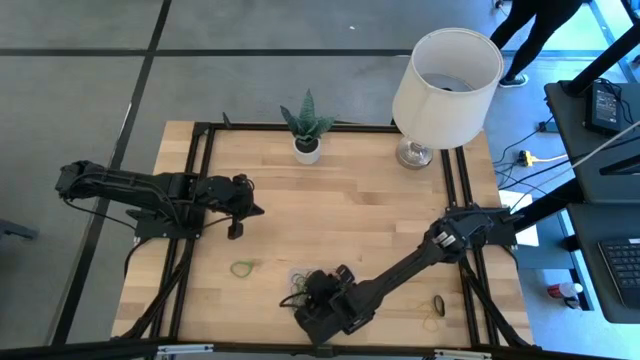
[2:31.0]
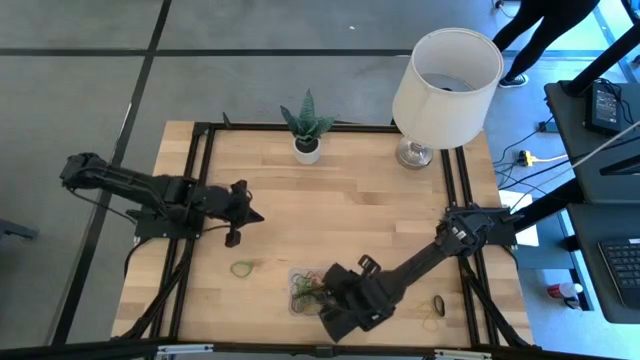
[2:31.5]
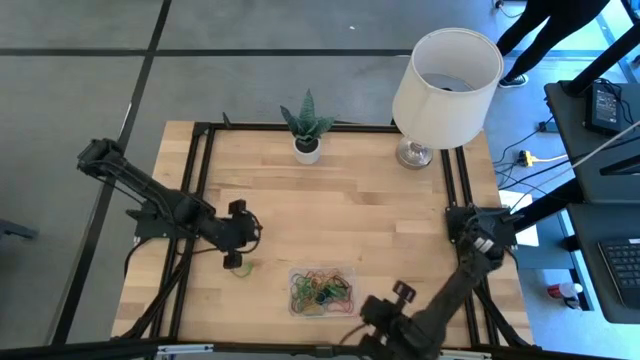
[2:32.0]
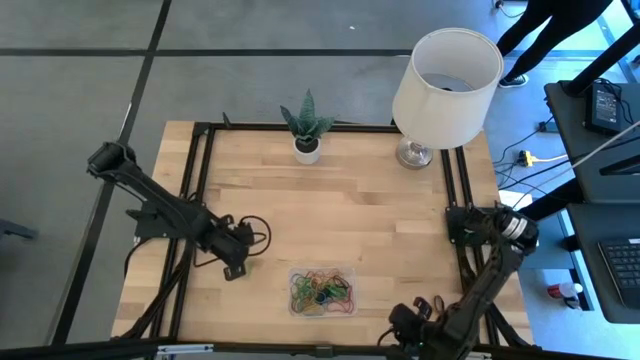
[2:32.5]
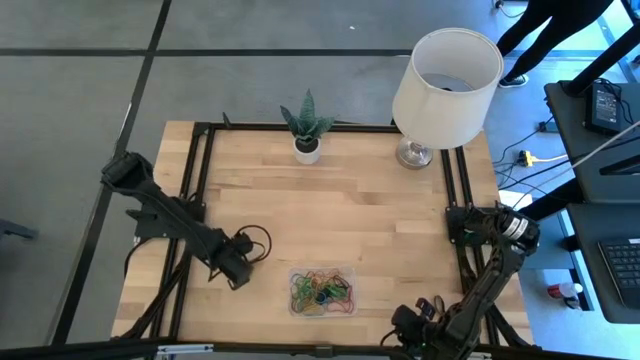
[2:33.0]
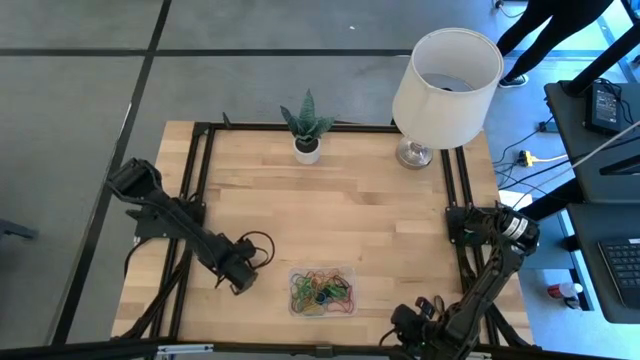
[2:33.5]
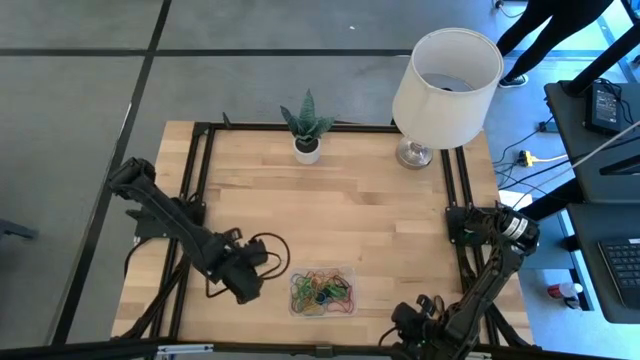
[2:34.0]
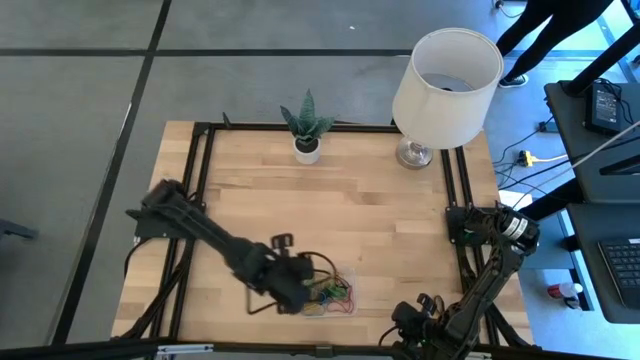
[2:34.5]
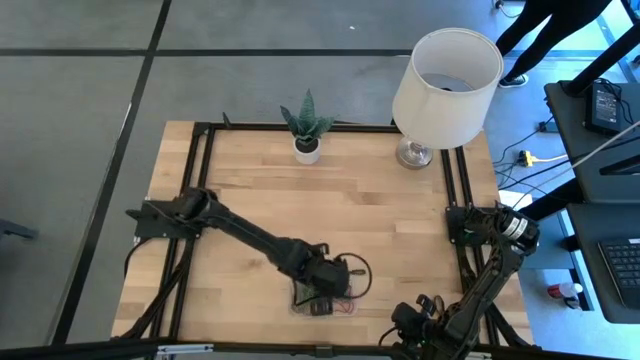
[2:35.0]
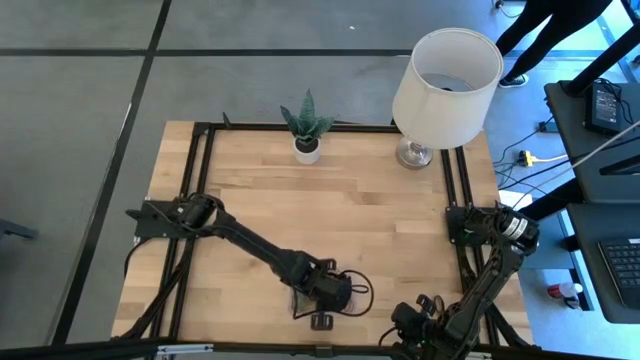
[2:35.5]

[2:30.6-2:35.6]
Task: Pick and place rubber bands into bin
Put the green rubber band into the transparent bin

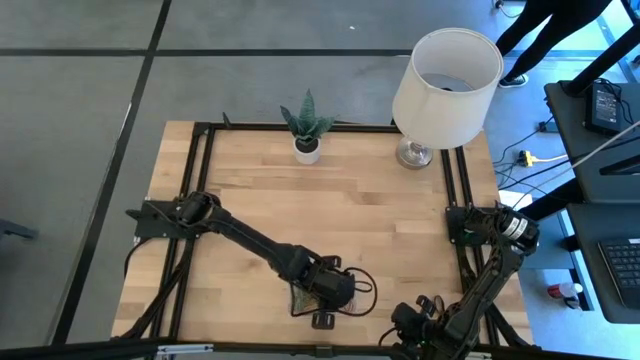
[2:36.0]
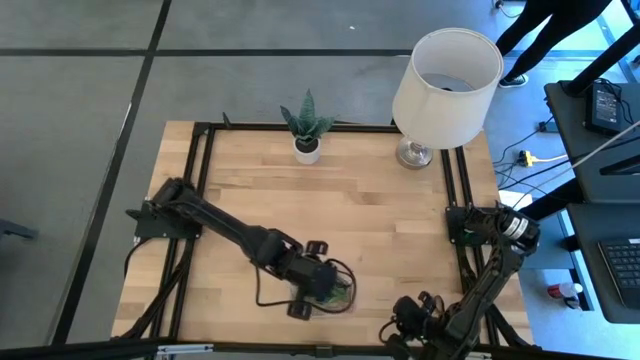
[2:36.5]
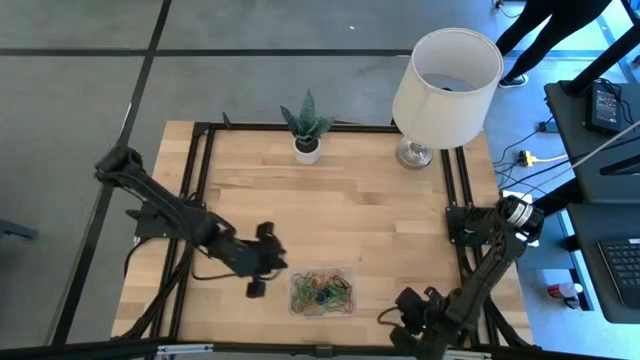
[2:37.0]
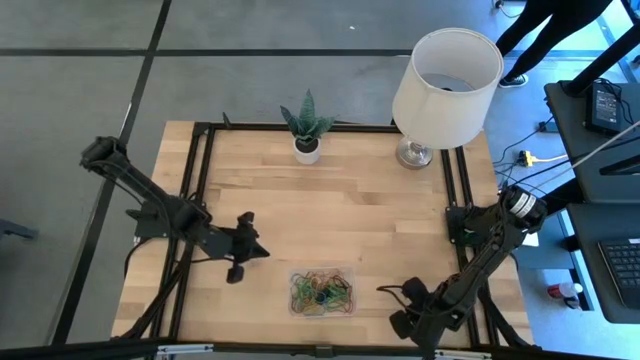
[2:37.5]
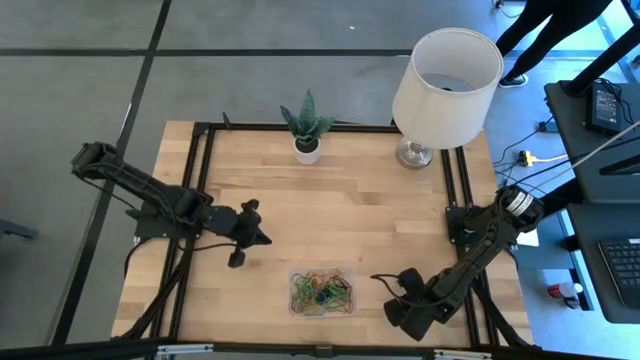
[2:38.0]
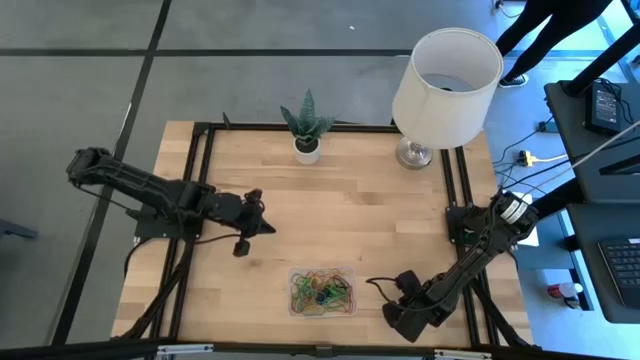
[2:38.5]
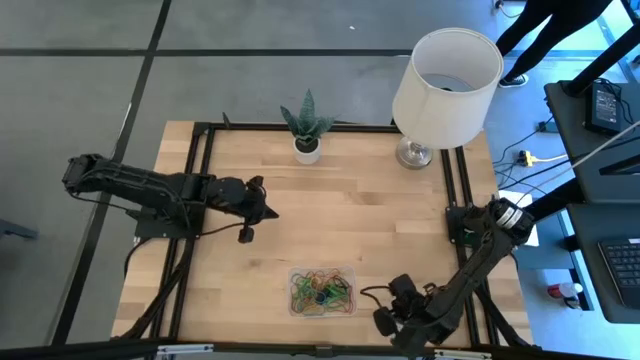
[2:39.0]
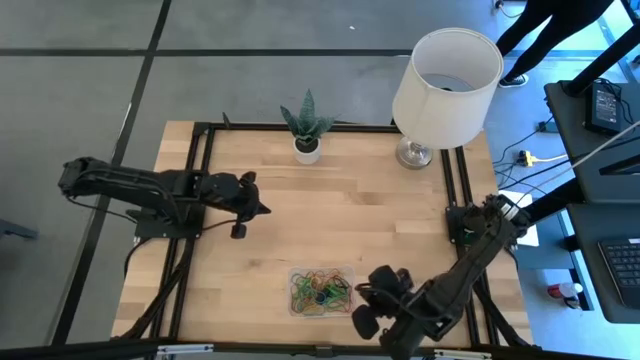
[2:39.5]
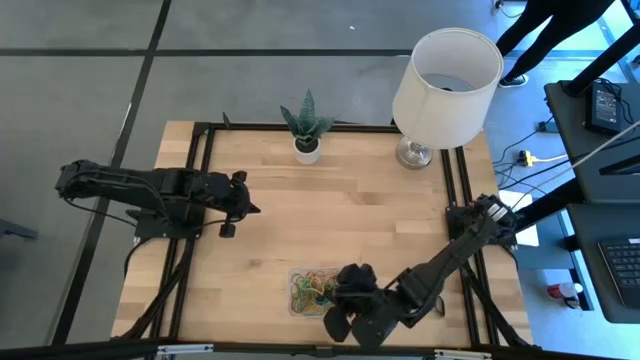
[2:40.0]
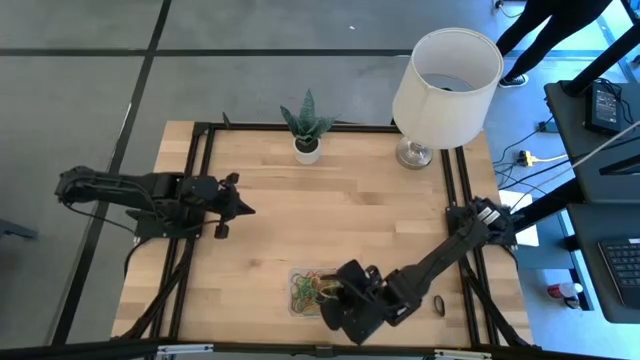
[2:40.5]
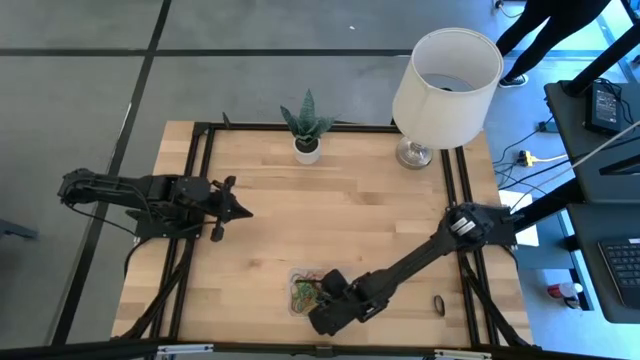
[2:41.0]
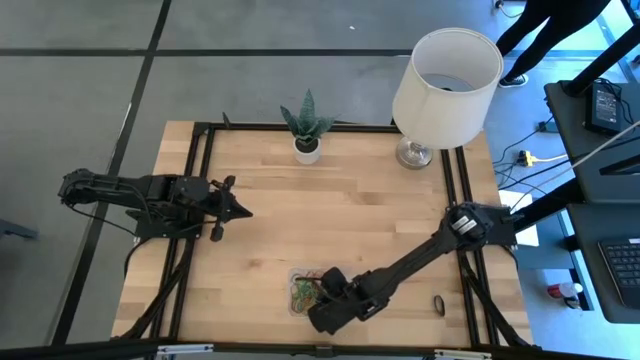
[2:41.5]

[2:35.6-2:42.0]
Put the yellow rubber band into the transparent bin

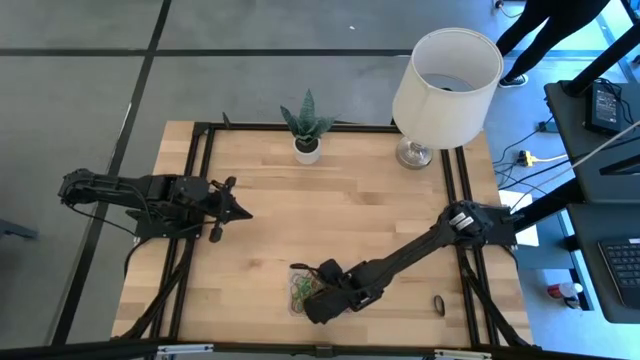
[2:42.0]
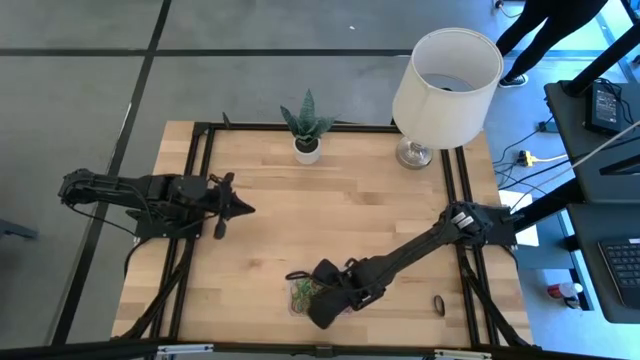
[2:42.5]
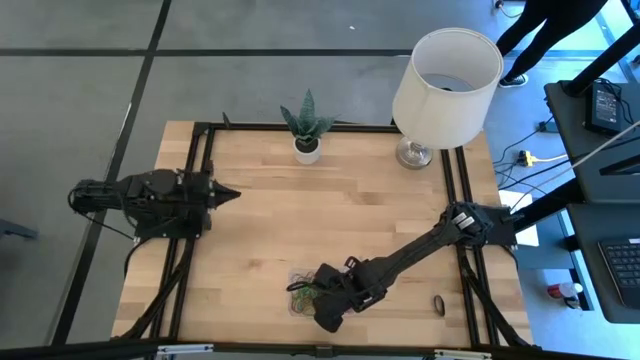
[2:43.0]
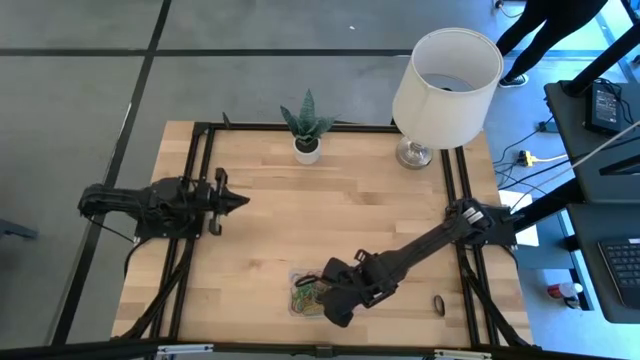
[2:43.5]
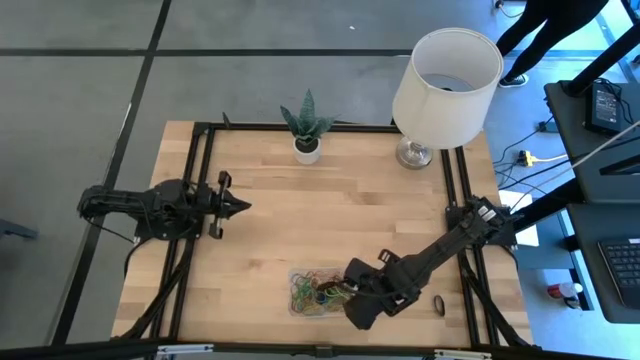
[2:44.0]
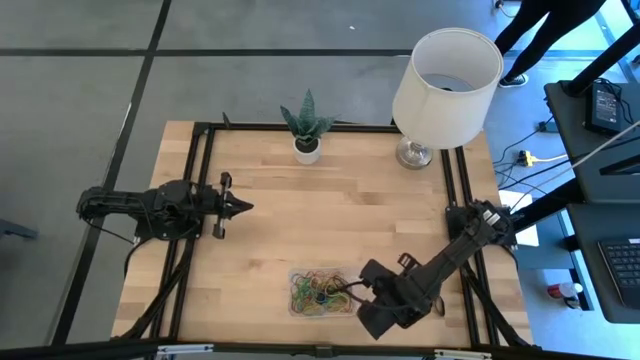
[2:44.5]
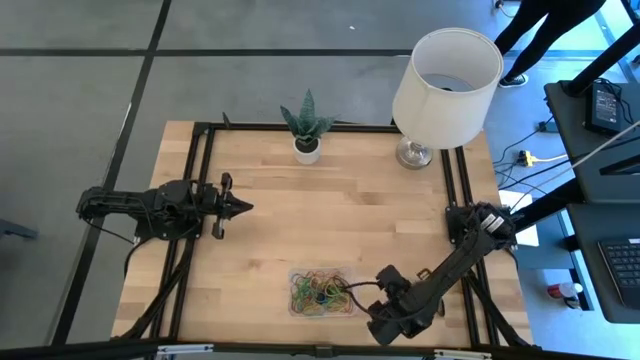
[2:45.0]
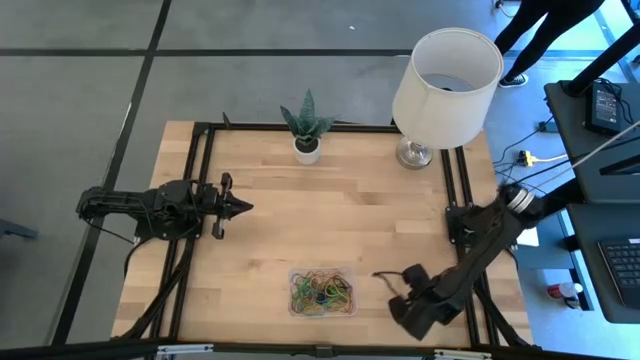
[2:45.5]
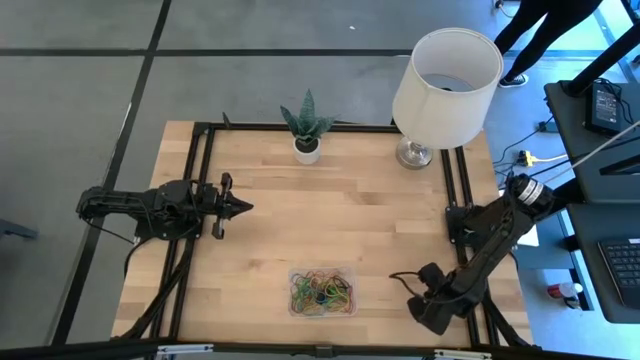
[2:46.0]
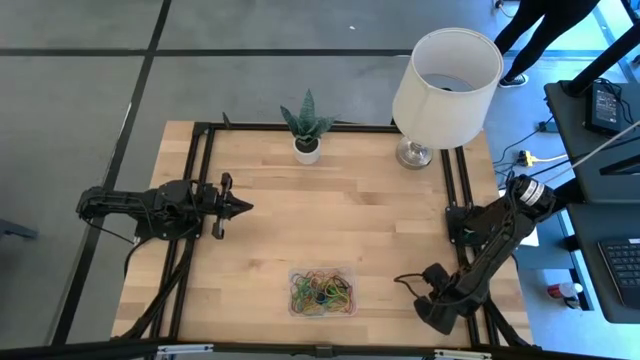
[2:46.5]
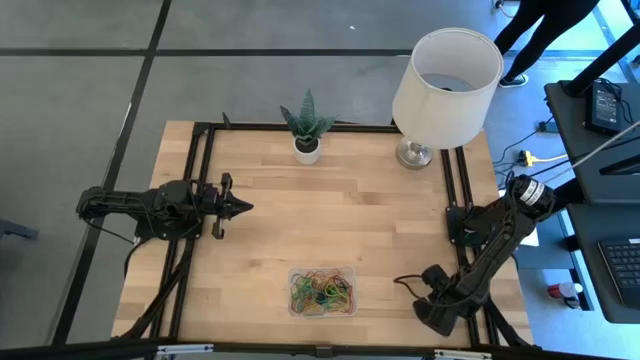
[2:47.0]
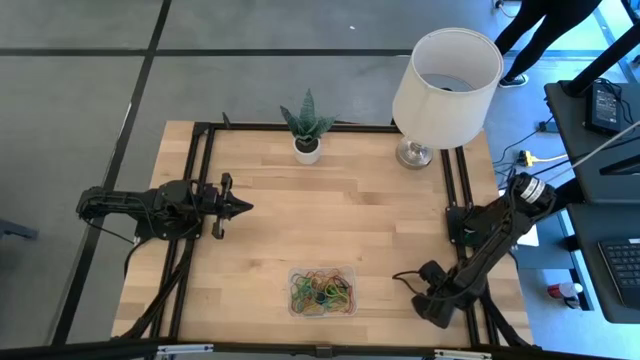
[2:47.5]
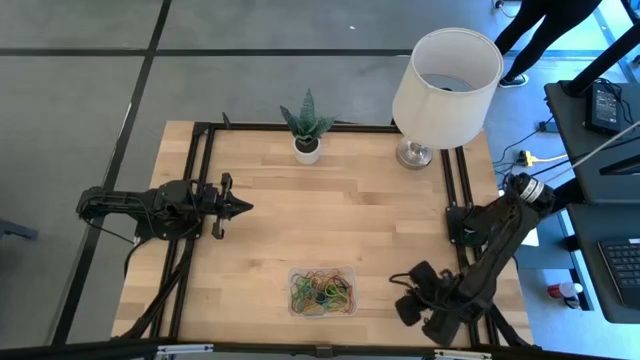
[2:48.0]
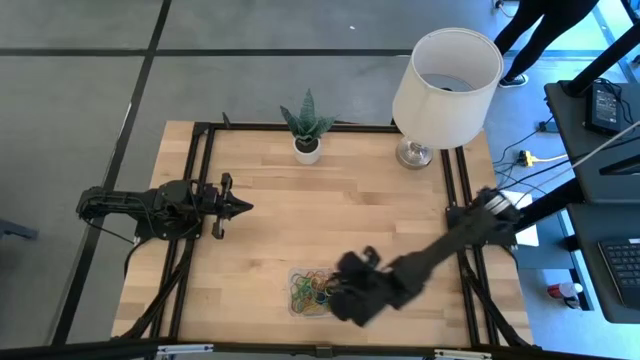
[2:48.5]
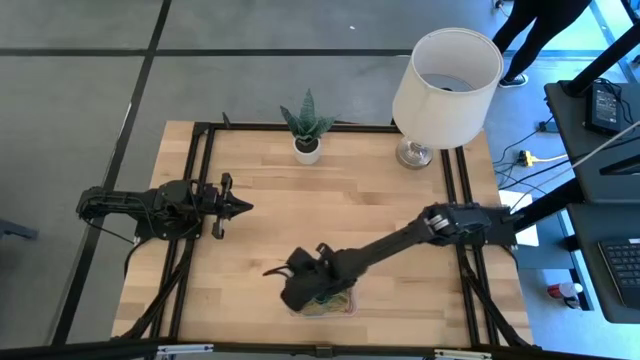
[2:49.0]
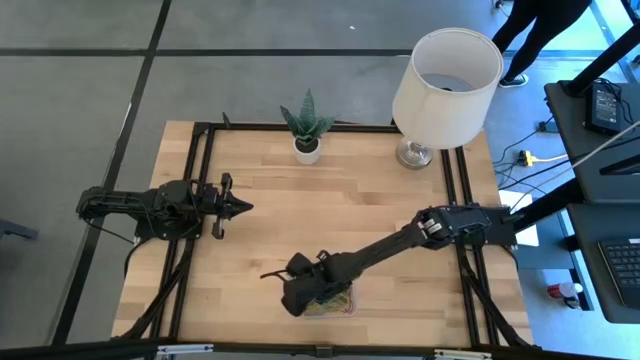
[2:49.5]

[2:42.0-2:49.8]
Put the black rubber band into the transparent bin

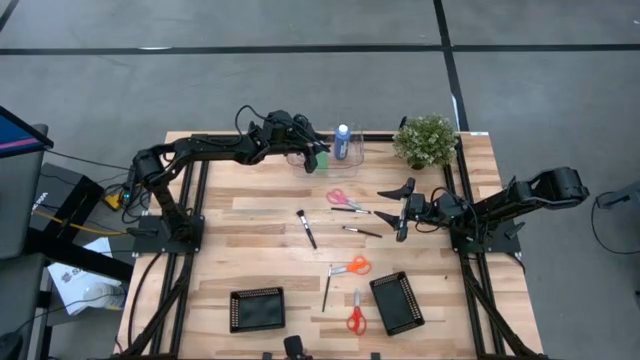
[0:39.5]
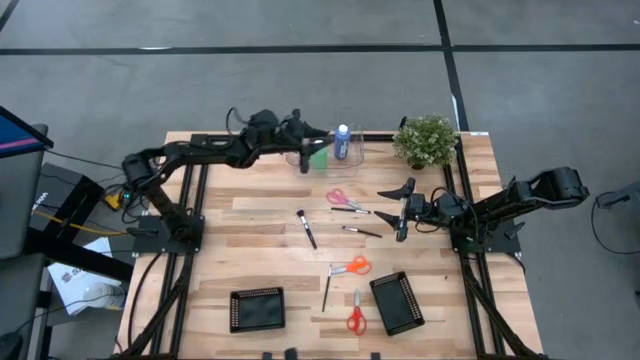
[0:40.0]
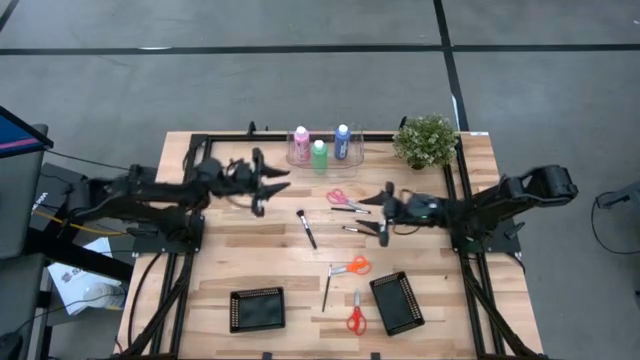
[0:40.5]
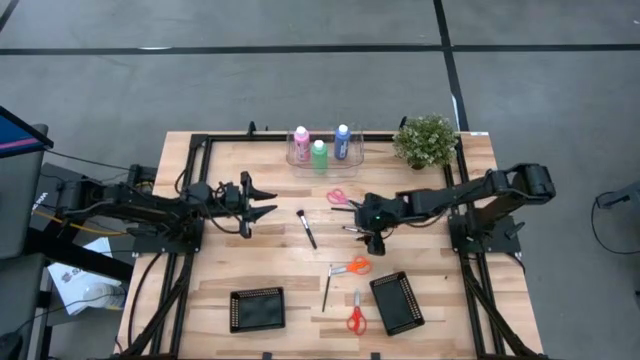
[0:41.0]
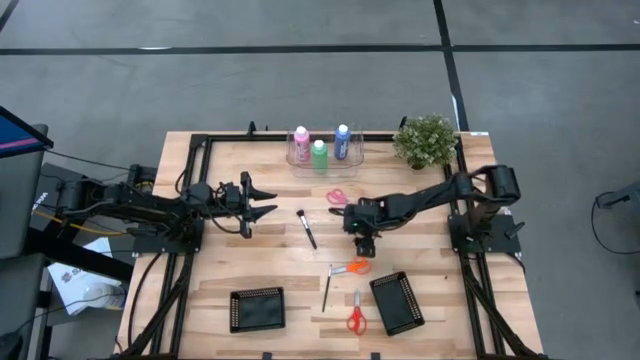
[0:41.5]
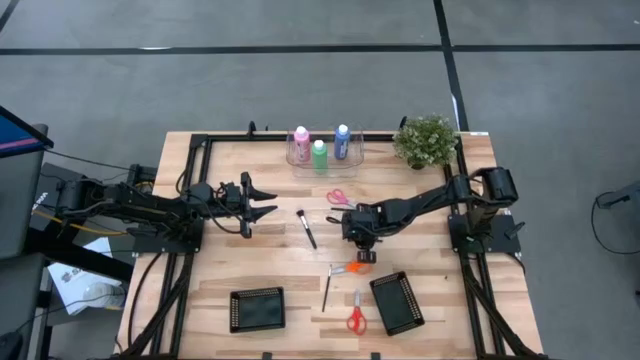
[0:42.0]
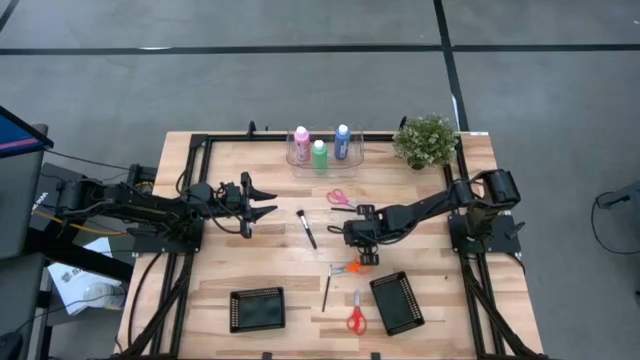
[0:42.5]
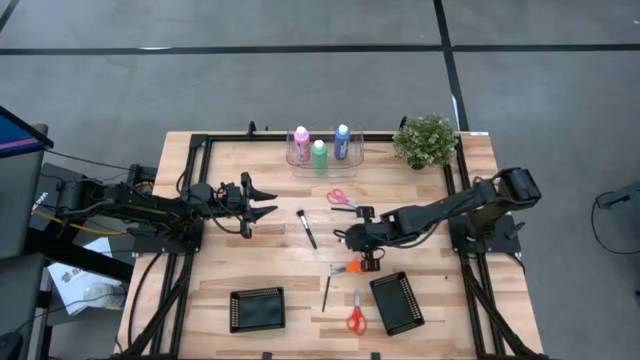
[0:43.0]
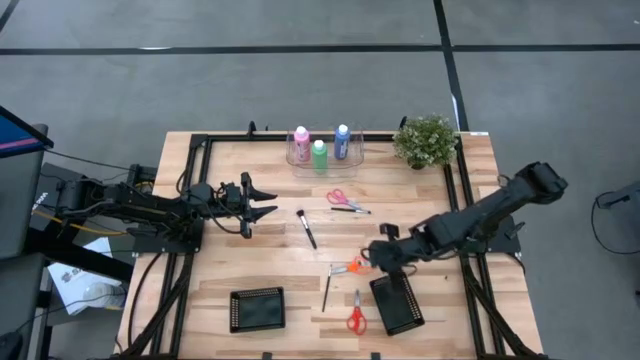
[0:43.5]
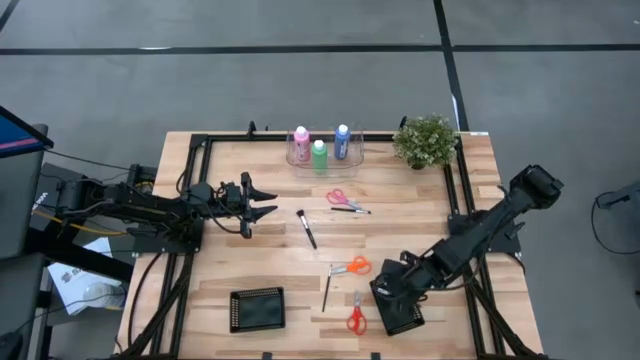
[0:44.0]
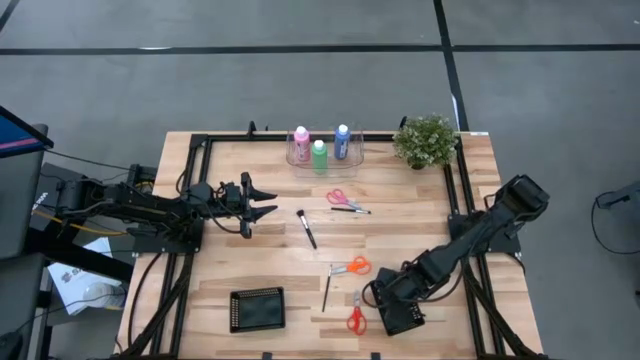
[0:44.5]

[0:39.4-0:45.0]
Task: Pick & Place Paint Supplies
Put the black paint brush into the right black bin
